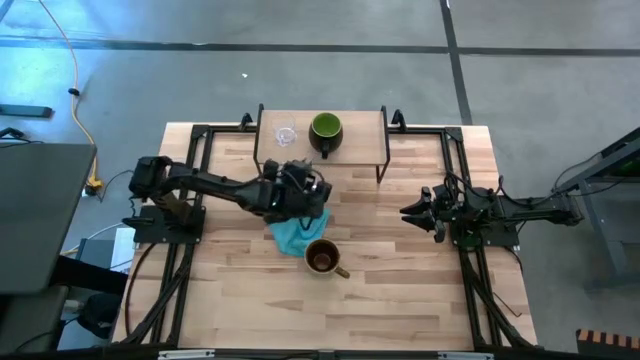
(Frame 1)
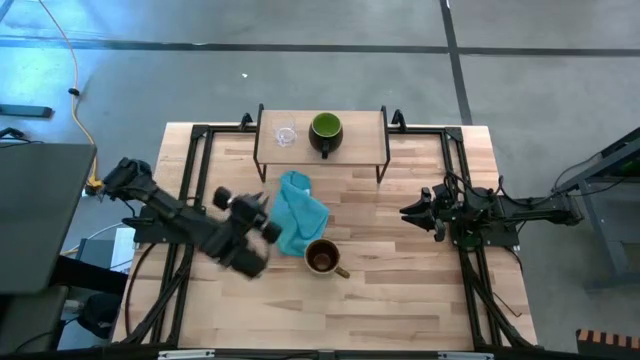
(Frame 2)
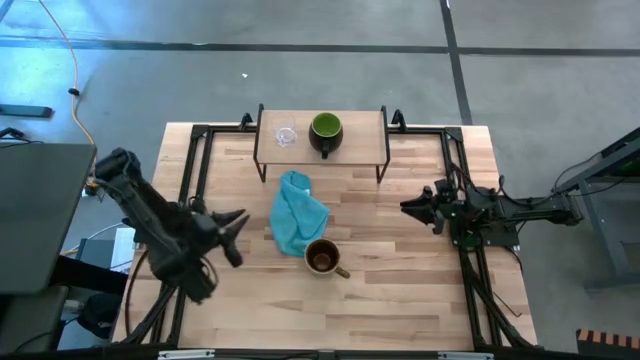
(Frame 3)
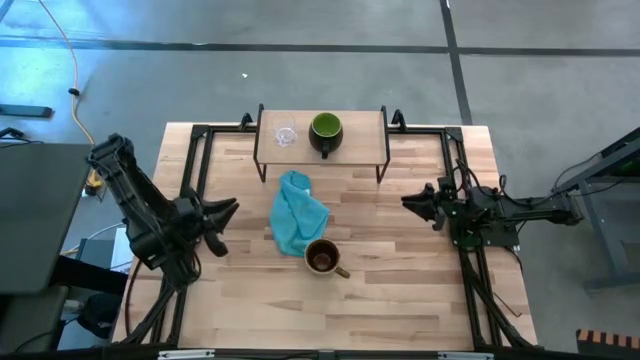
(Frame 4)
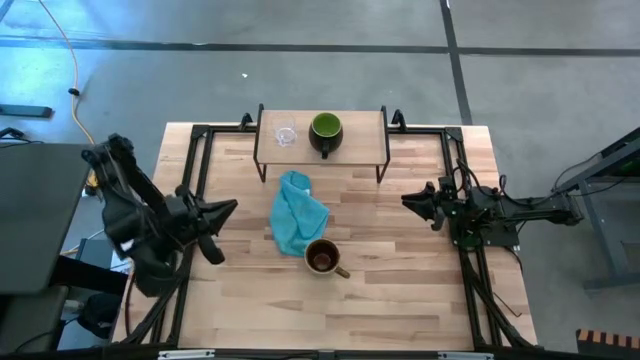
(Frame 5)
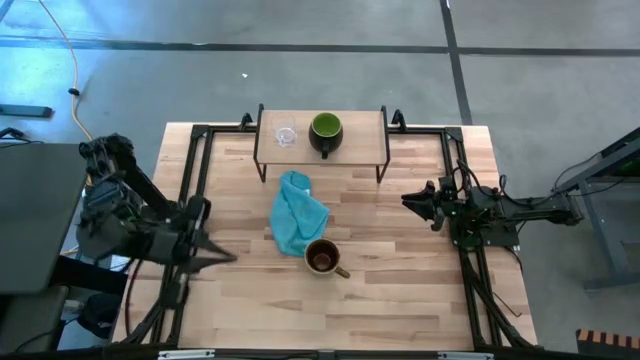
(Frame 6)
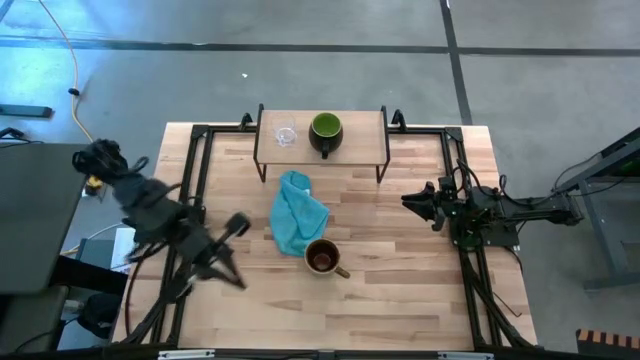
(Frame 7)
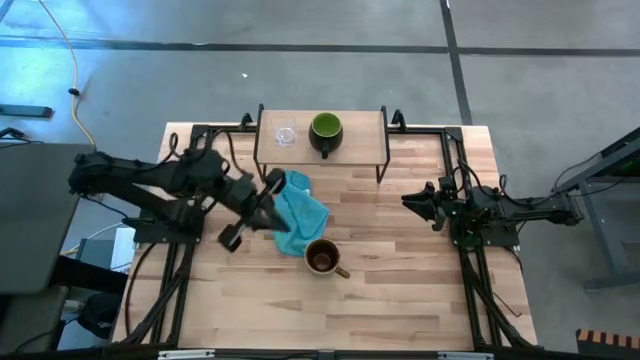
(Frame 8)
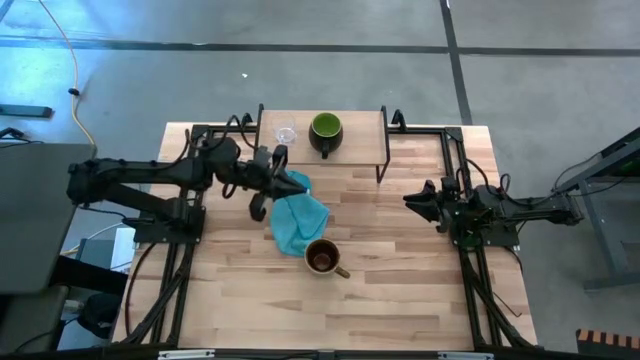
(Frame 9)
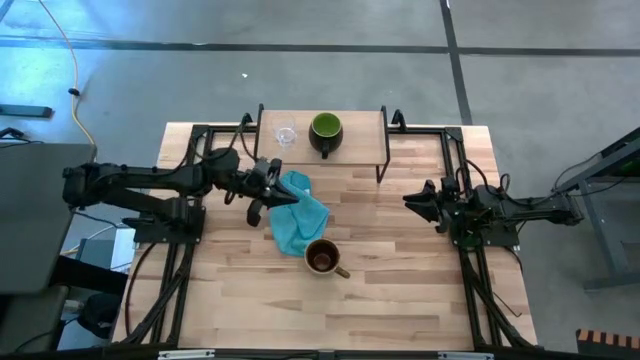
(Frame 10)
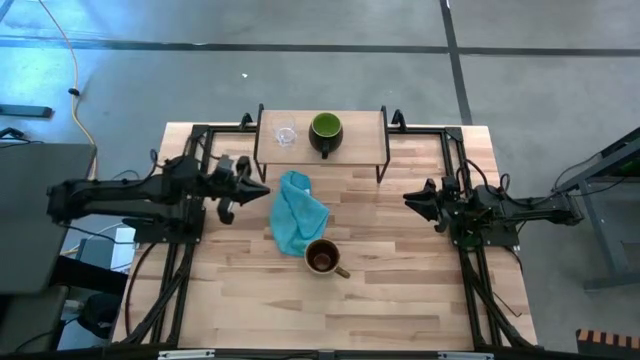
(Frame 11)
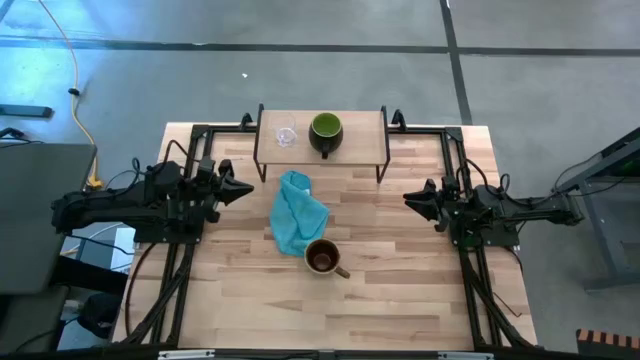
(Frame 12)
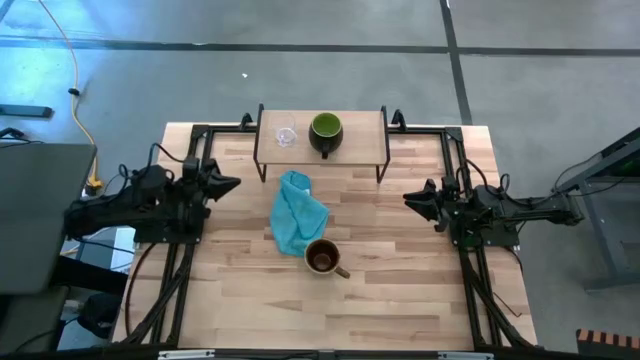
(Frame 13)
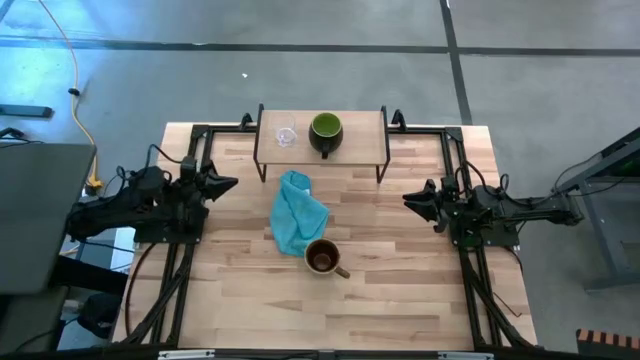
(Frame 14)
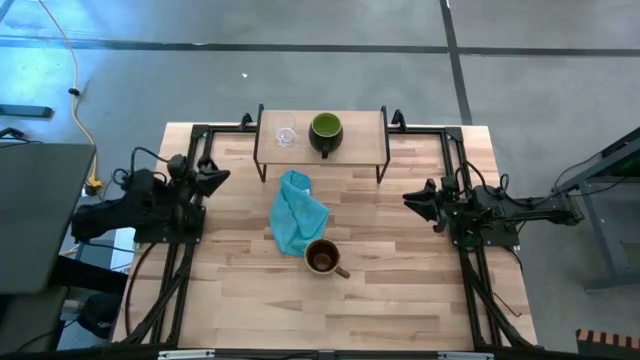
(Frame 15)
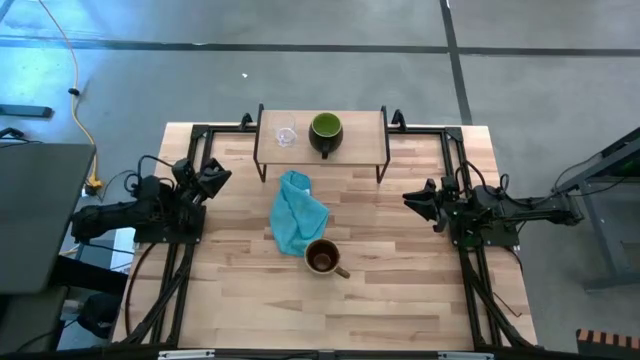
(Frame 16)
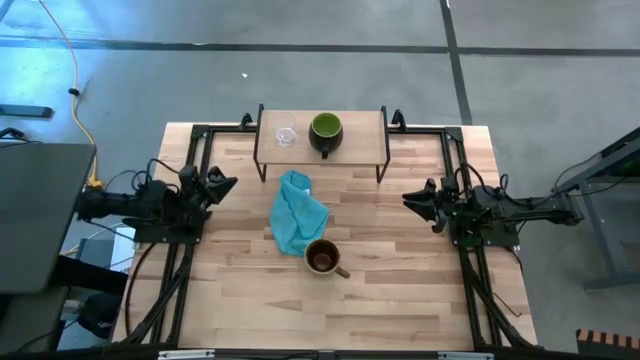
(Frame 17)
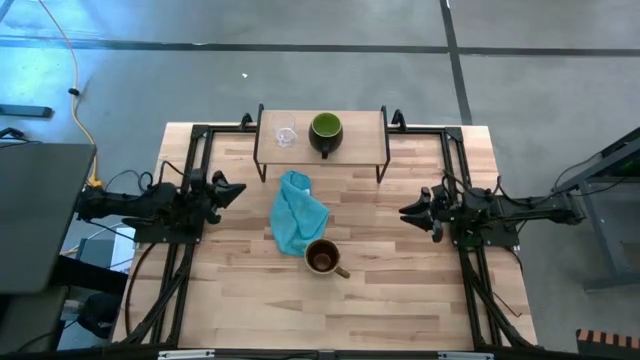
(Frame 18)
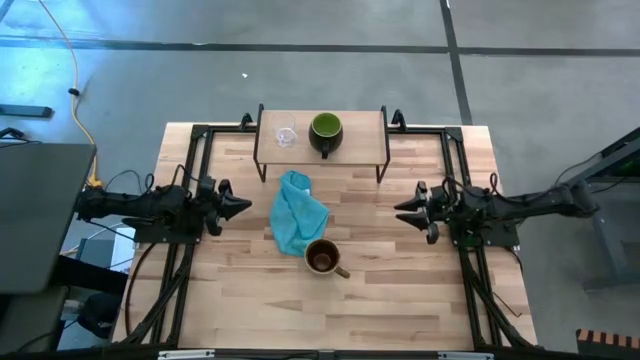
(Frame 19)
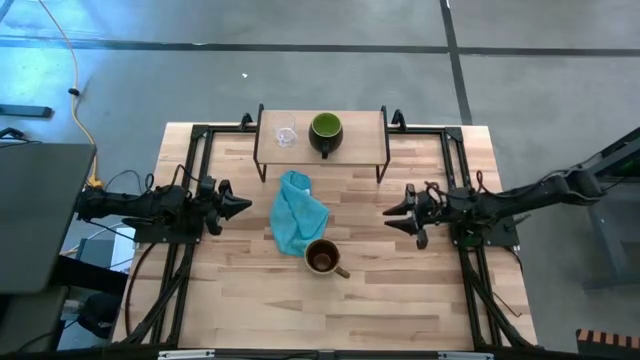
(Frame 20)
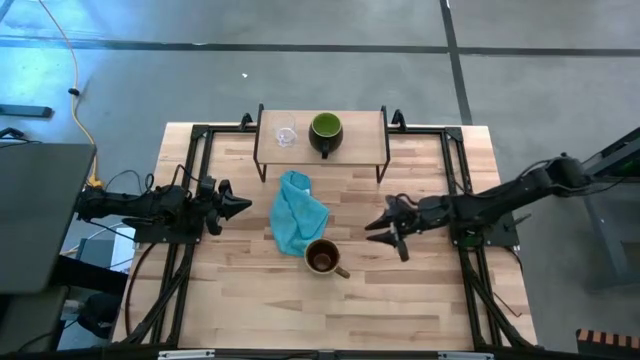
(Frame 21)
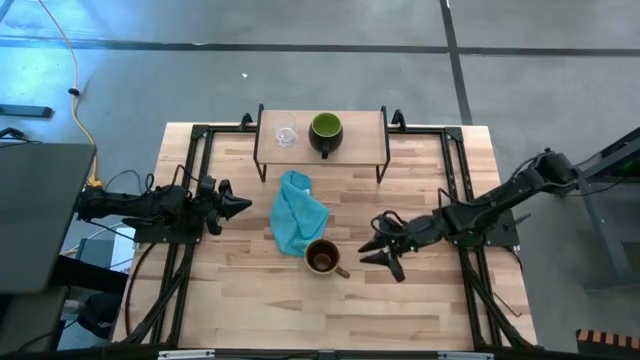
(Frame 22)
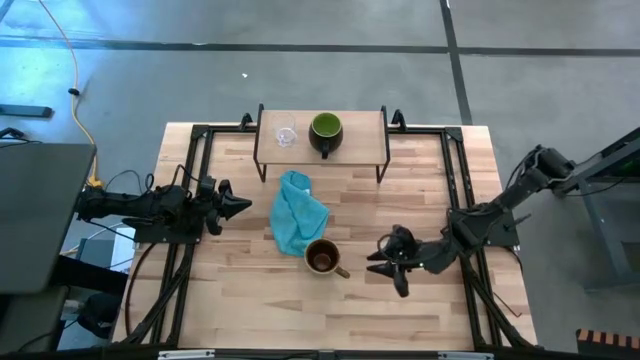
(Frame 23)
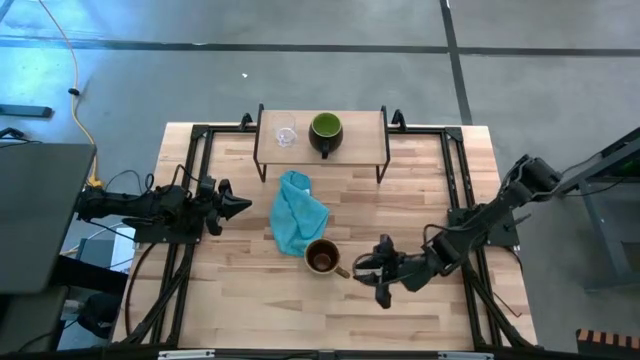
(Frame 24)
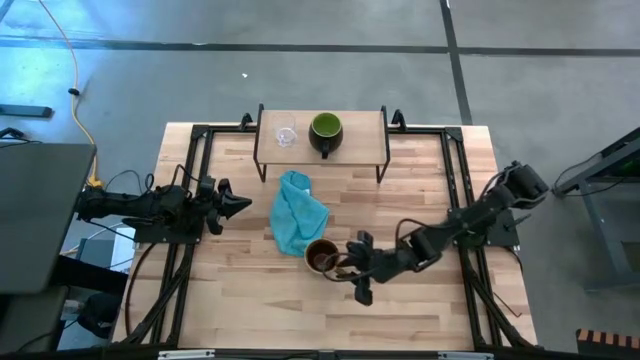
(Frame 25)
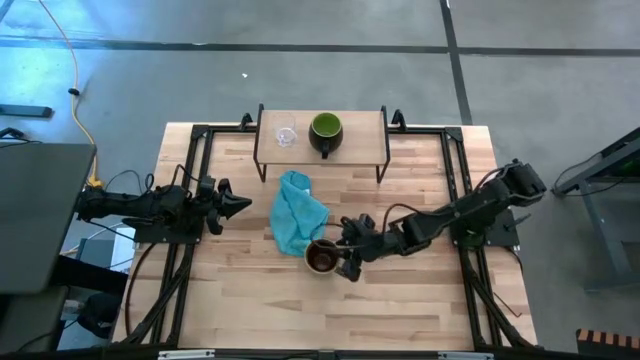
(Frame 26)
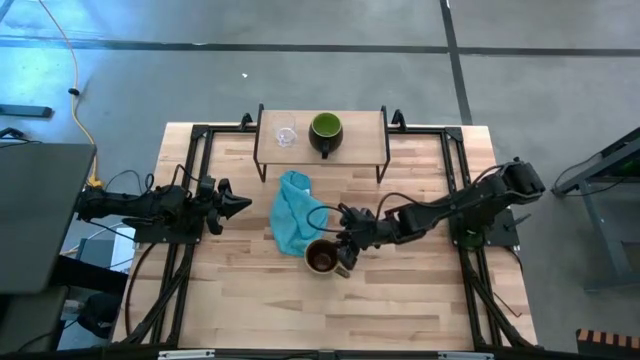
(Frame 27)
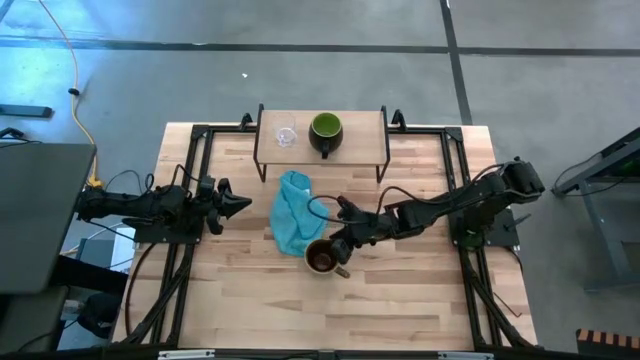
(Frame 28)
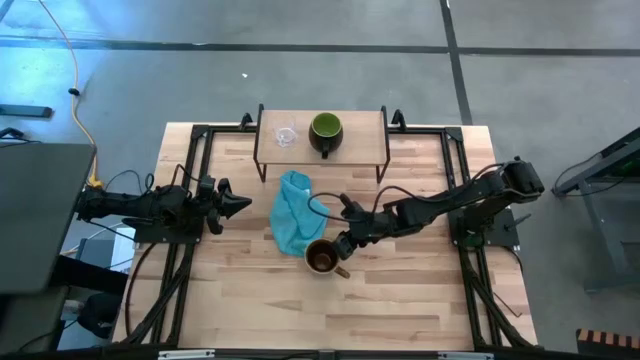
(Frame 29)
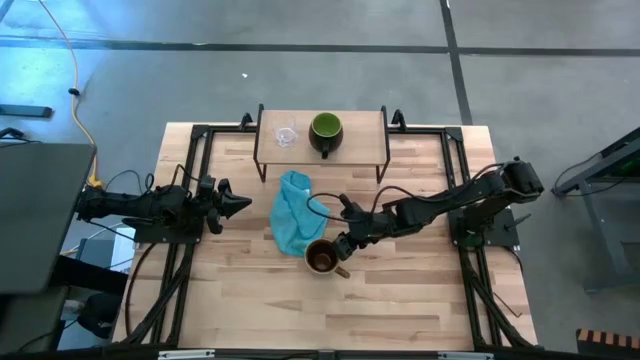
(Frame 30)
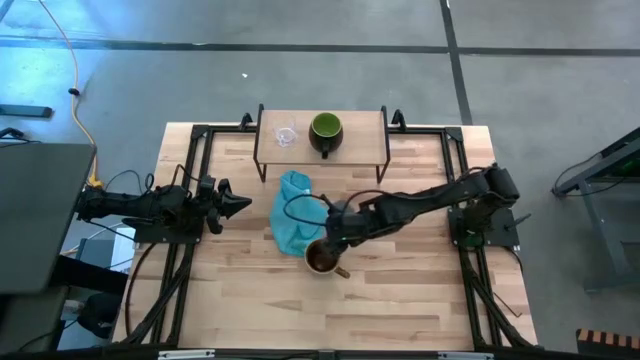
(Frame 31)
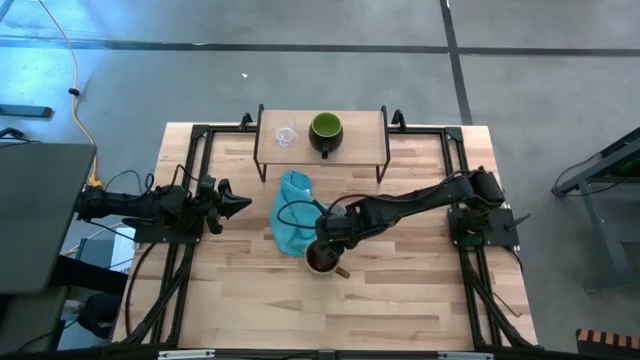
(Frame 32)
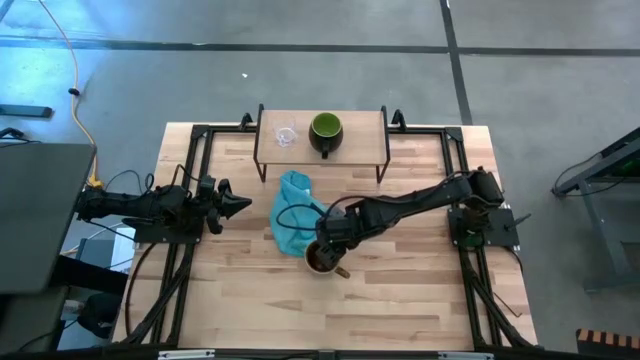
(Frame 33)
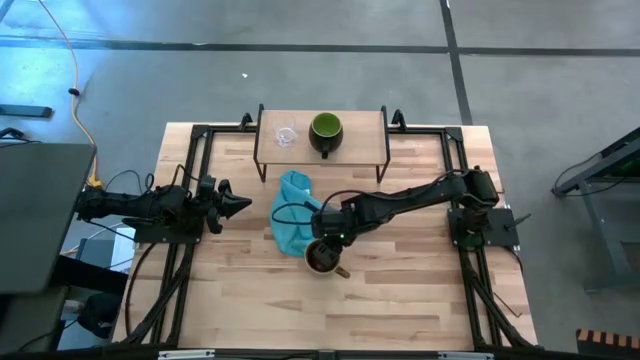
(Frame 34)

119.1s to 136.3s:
Task: Stack small to large cups/mugs on shelf
Put the brown mug on the shelf

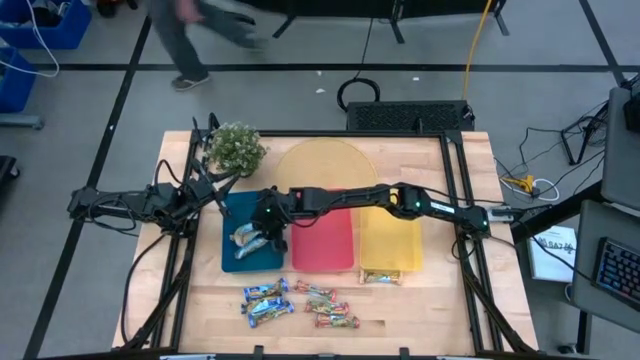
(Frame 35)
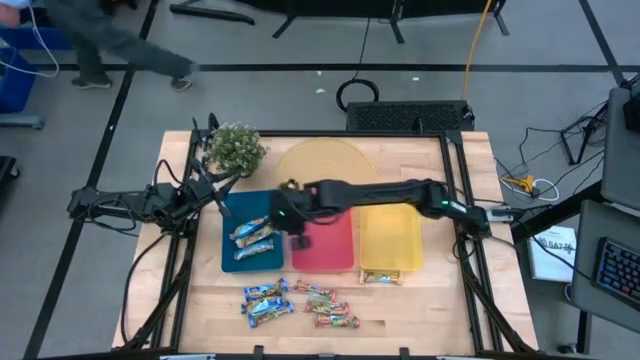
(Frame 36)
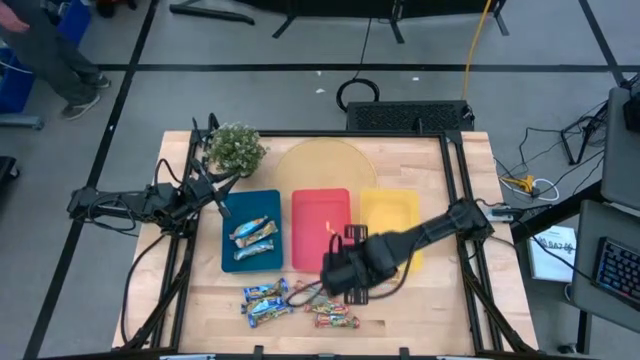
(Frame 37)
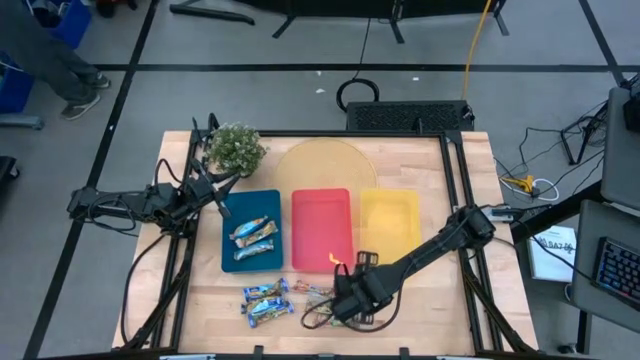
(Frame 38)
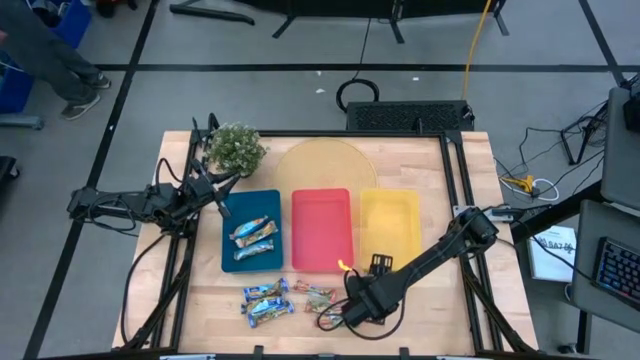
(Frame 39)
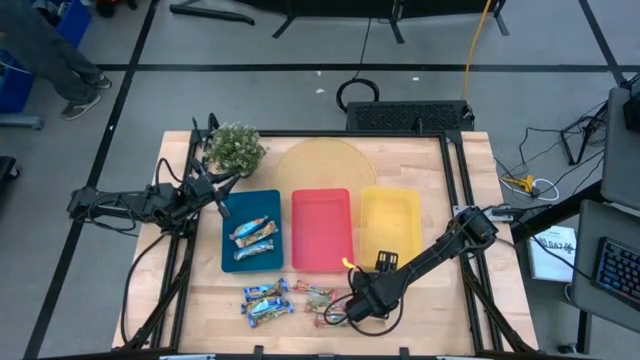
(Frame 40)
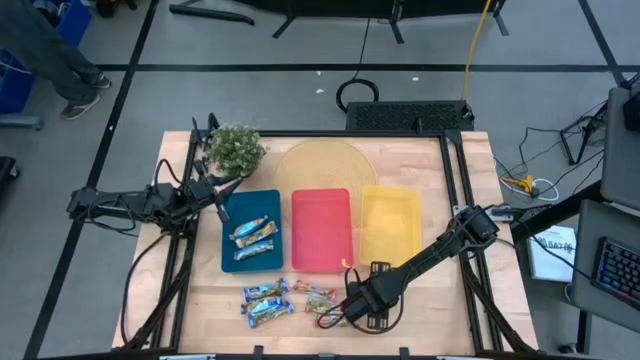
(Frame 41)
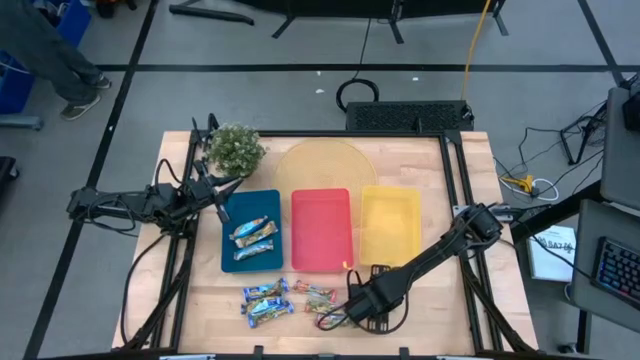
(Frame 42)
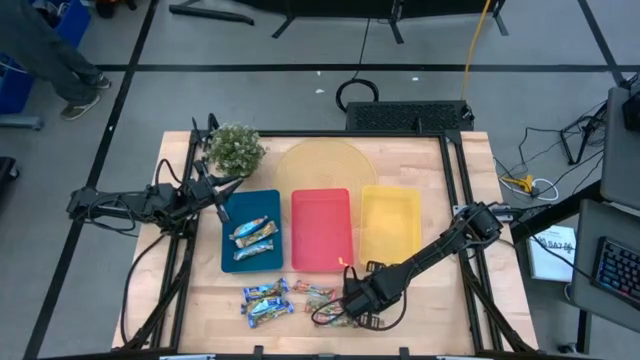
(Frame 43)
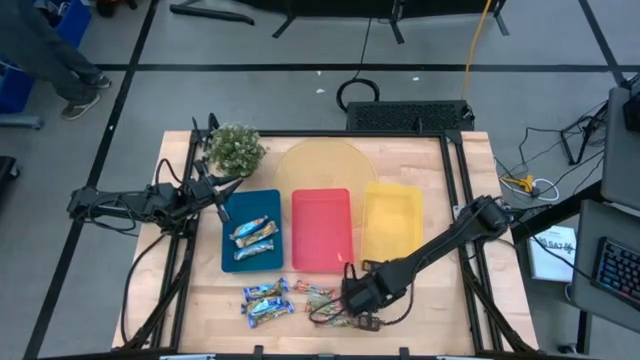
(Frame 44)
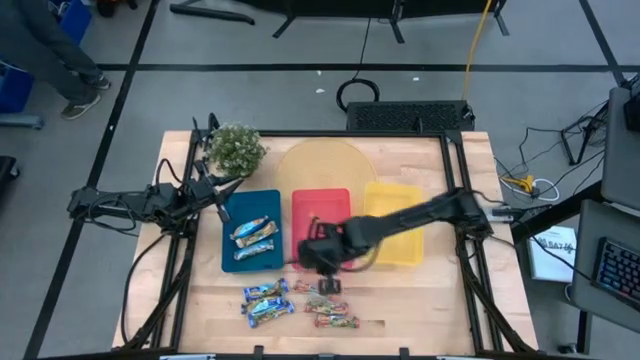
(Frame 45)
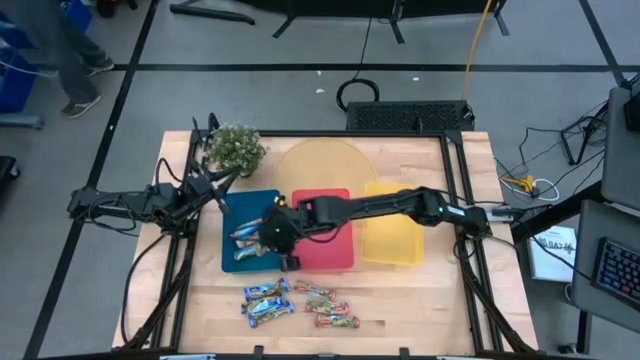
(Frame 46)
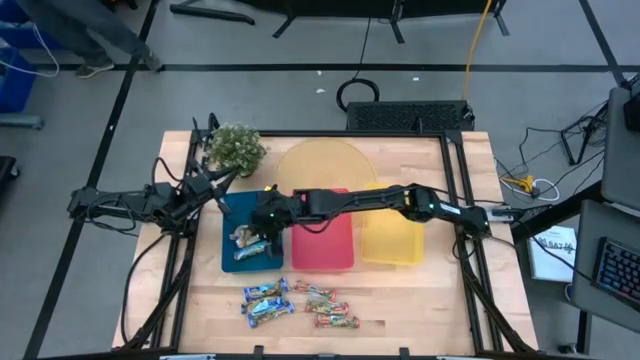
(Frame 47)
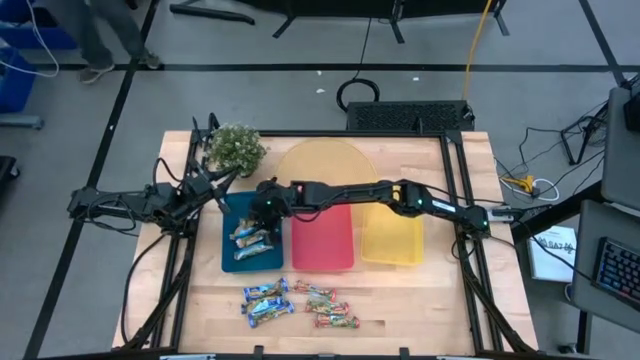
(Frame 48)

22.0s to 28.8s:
Task: Pick and place Granola Bars by type
Put the yellow granola bar into the blue bin
